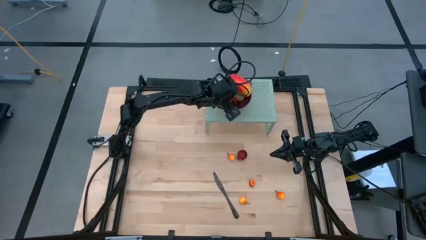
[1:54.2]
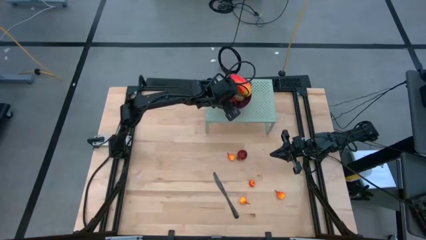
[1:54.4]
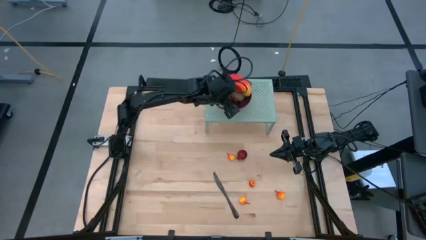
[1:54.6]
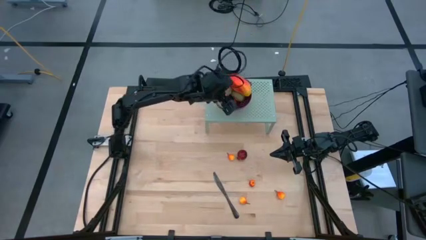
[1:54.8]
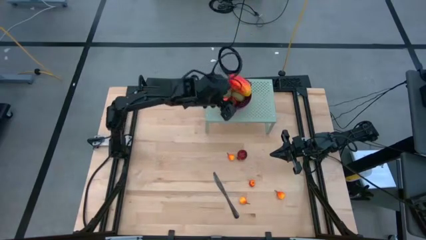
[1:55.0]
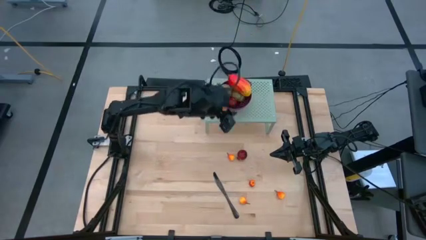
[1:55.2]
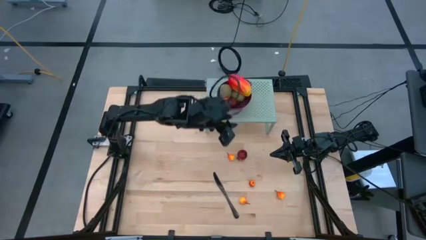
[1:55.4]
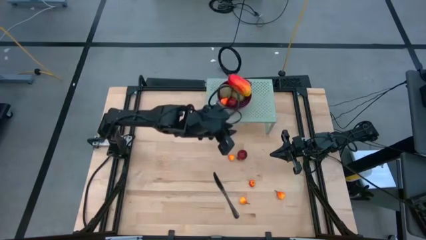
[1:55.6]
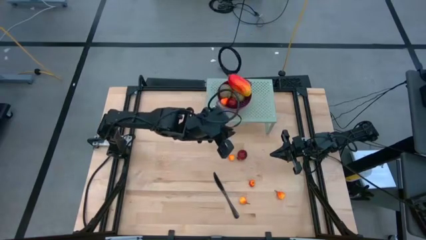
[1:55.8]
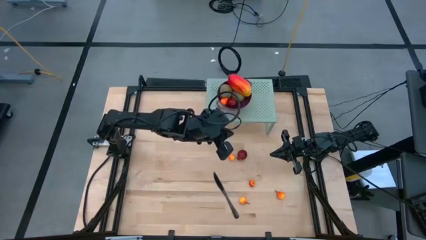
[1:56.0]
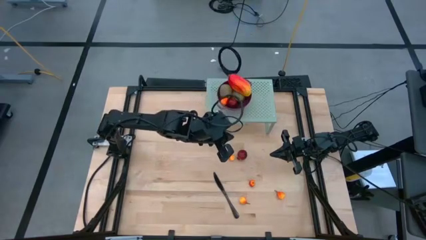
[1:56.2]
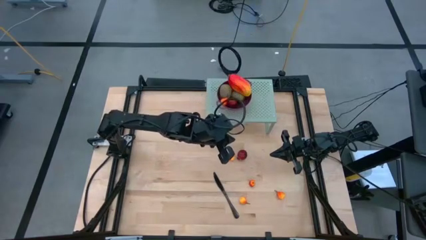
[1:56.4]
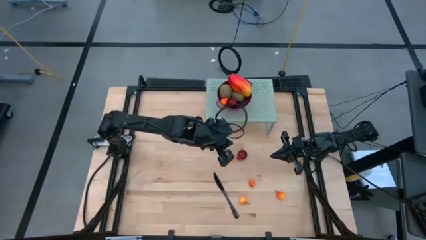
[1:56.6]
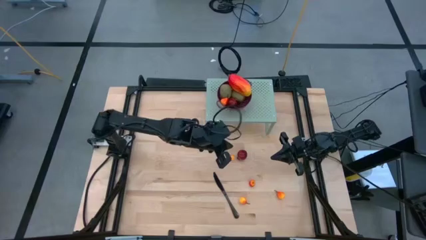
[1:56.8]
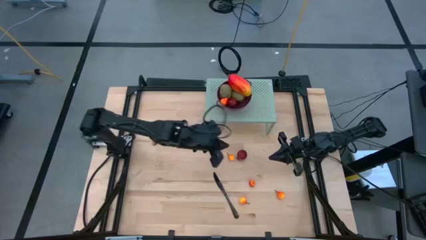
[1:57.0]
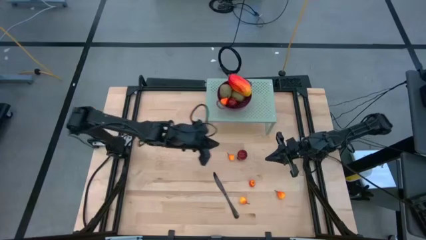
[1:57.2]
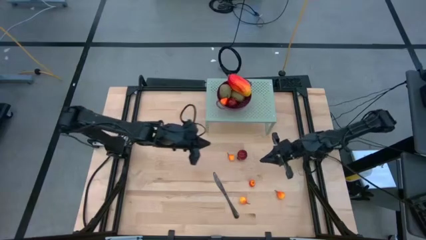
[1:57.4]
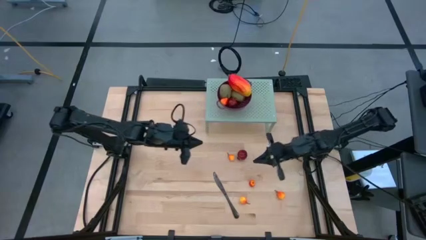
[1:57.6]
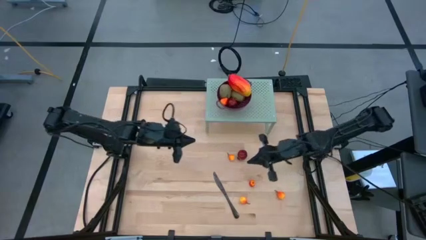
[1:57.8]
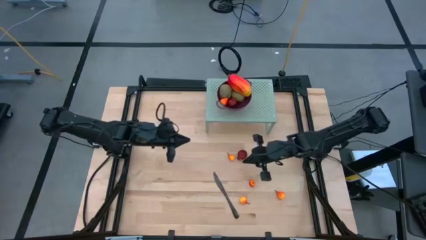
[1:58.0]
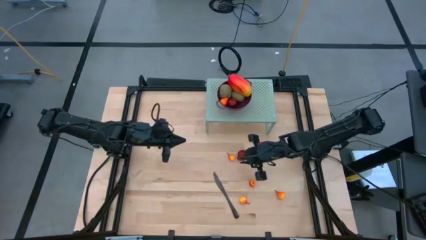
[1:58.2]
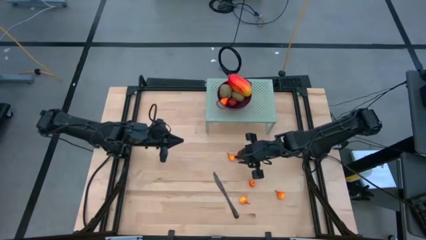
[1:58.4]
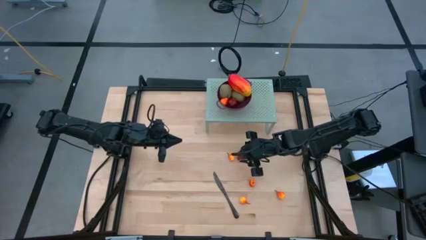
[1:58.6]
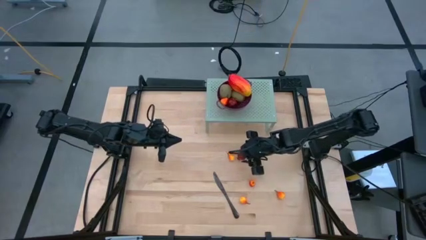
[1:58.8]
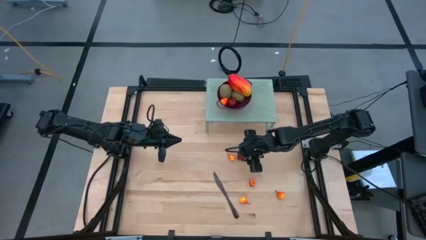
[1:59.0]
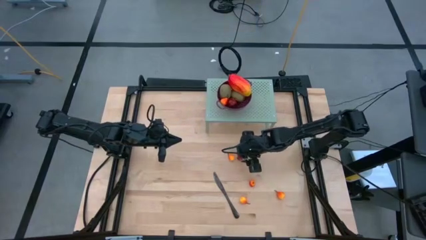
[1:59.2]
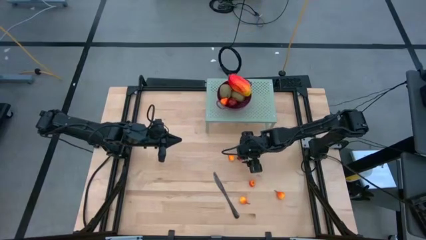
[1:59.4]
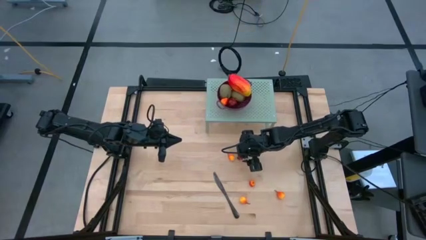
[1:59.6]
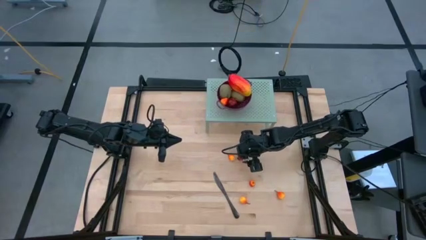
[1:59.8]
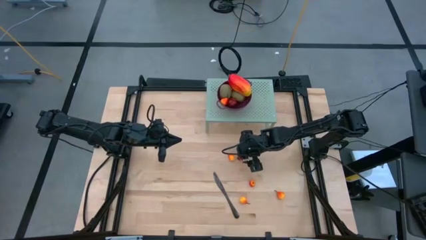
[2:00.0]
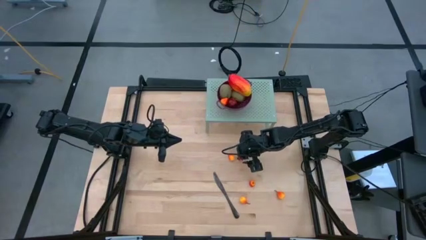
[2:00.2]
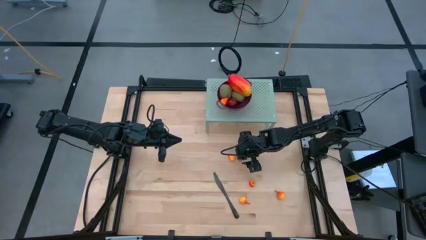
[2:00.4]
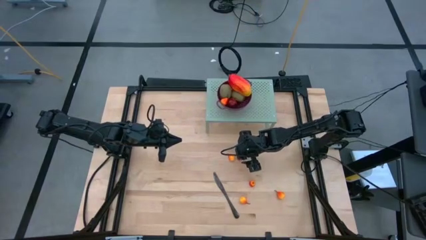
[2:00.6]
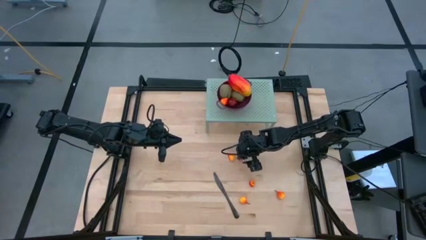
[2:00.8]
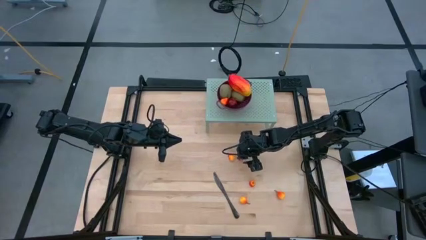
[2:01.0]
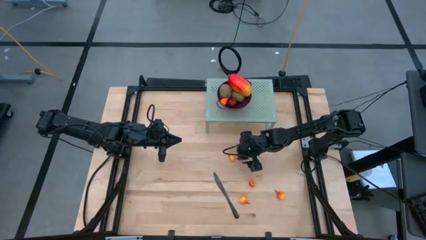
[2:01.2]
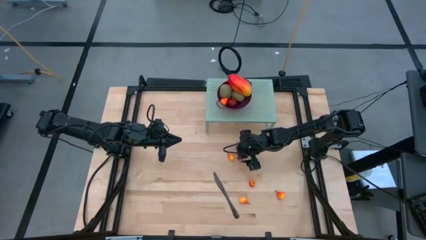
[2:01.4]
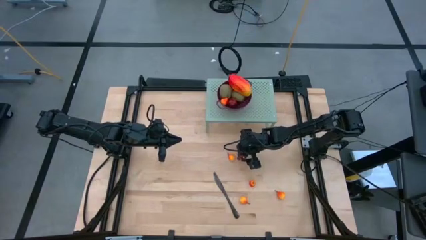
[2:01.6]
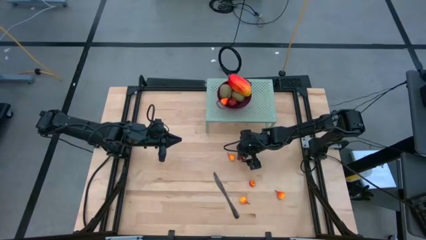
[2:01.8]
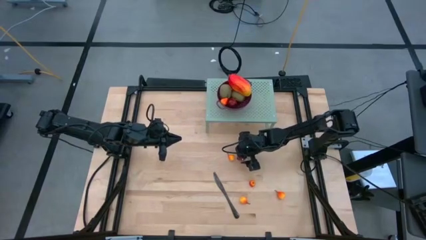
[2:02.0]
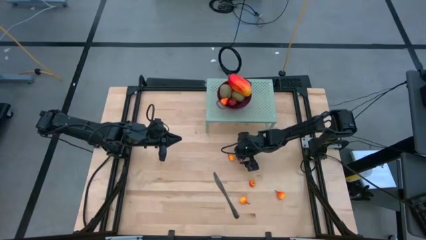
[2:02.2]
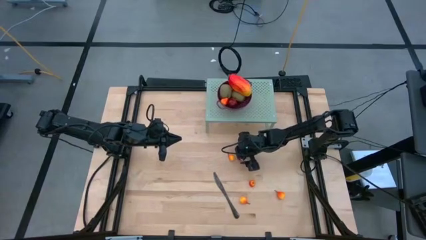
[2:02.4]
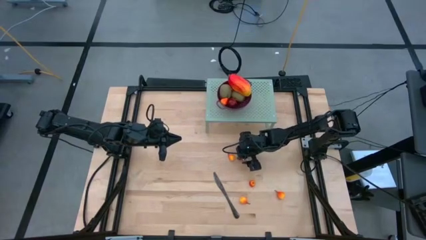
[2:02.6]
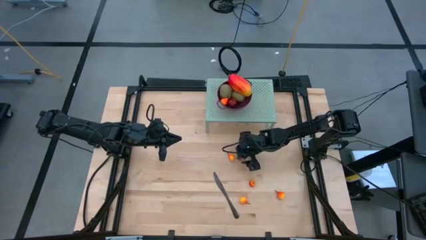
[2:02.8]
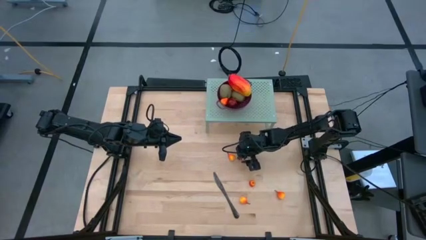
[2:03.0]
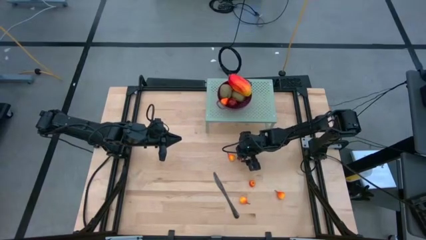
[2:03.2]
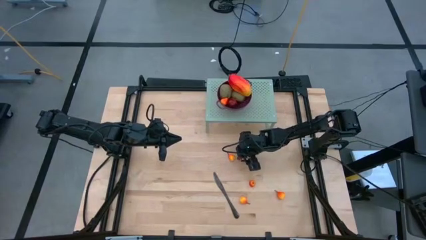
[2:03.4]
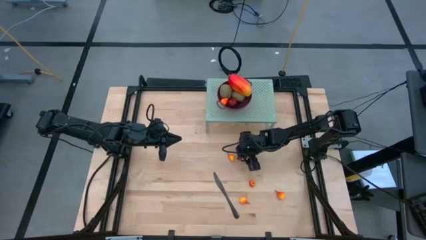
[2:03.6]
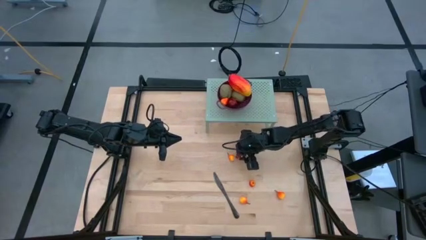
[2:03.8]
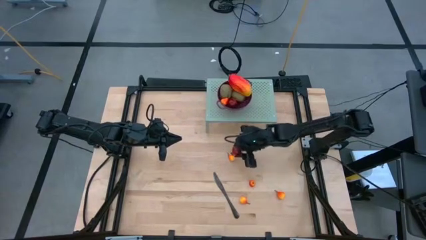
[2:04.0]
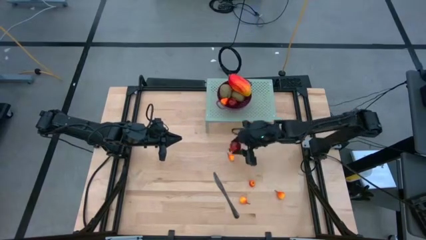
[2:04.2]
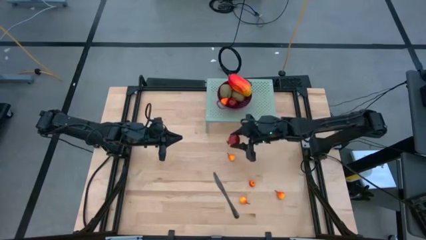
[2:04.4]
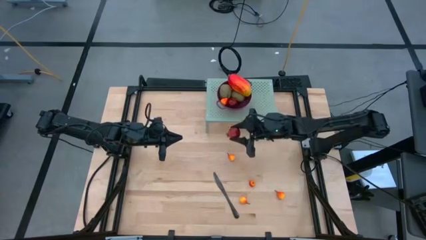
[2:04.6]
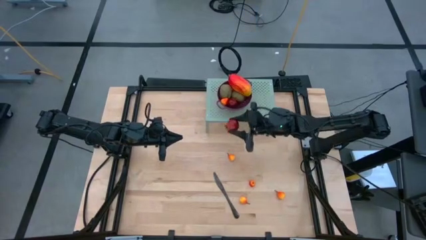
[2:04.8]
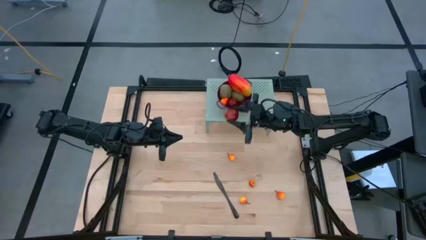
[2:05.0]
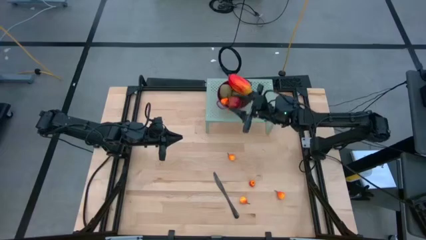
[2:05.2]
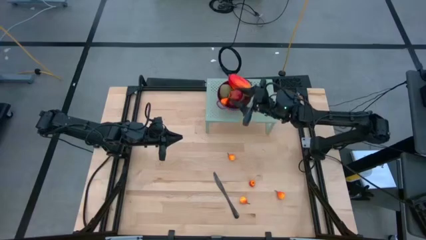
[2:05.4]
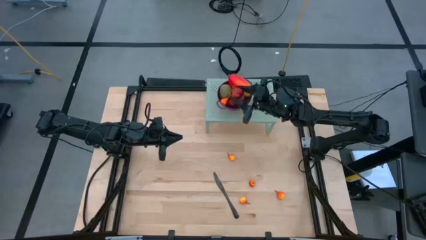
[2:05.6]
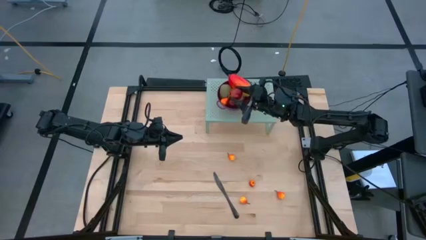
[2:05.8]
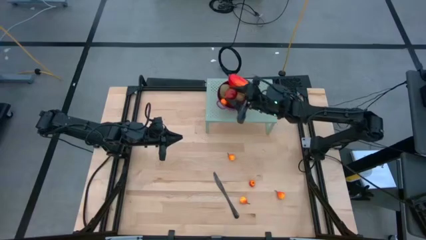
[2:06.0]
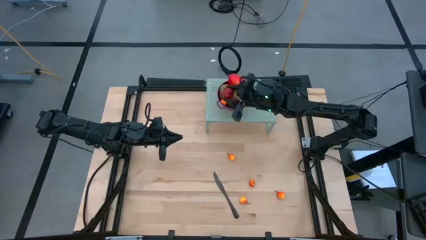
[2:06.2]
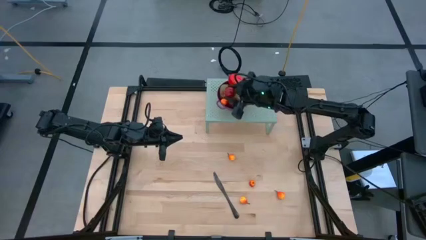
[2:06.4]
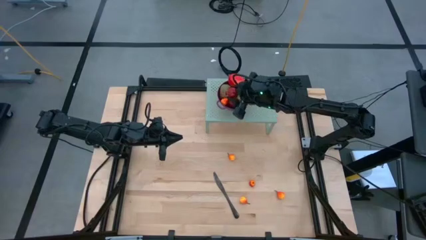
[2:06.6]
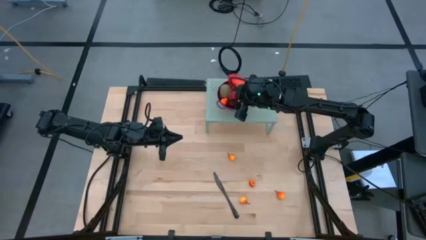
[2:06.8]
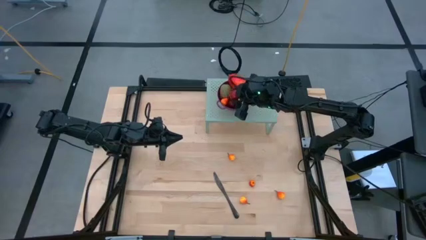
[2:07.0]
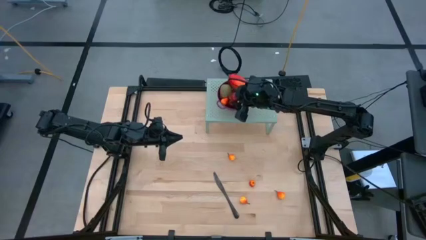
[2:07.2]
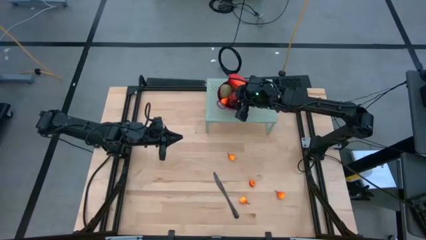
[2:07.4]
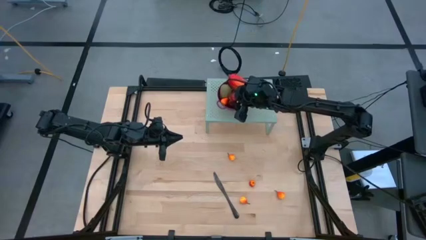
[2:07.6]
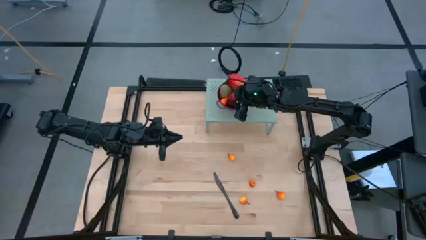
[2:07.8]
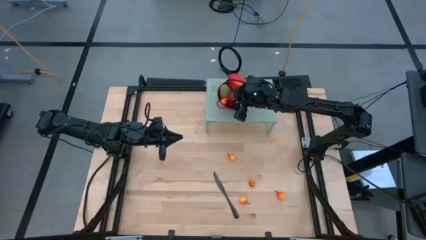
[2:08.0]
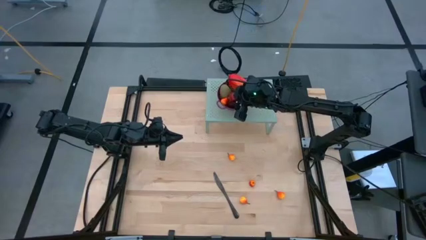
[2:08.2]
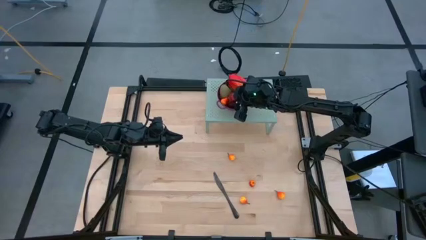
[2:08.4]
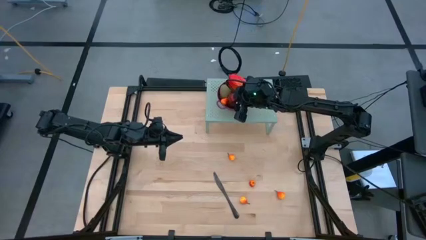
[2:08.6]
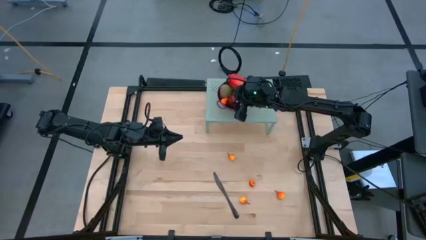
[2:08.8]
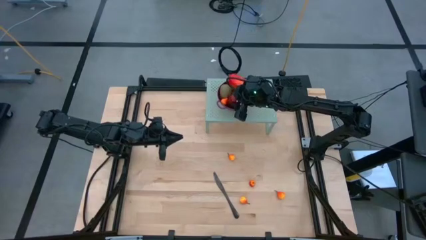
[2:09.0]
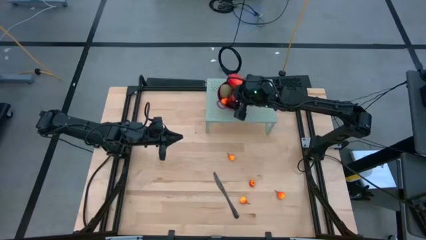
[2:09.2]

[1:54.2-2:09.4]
Task: Pick & Place Fruit
Put the red pomegranate into the violet strainer bowl on the shelf

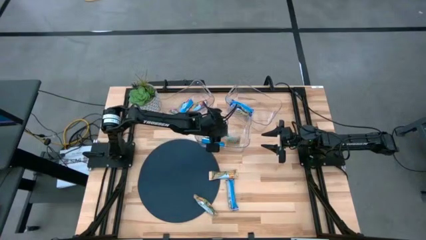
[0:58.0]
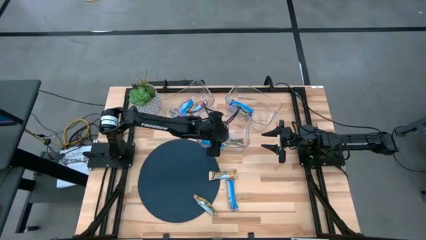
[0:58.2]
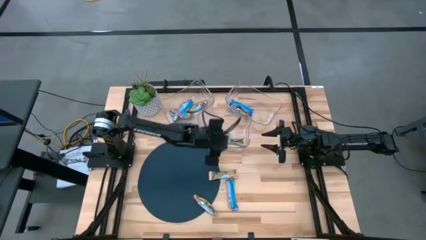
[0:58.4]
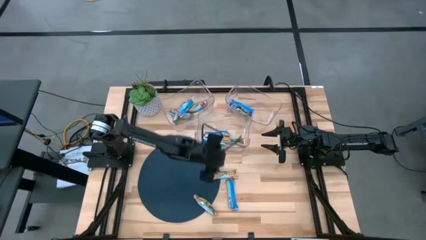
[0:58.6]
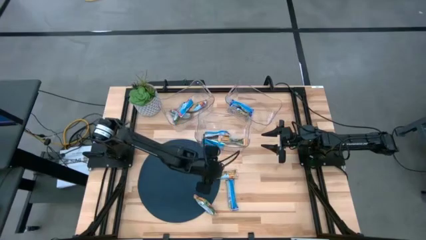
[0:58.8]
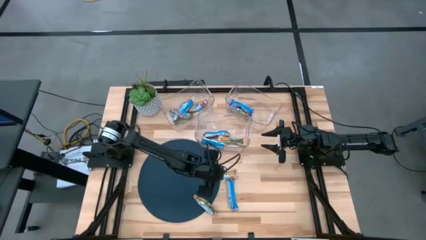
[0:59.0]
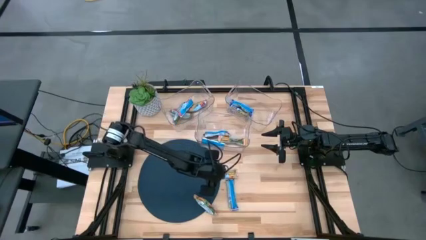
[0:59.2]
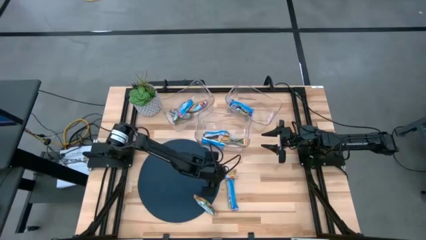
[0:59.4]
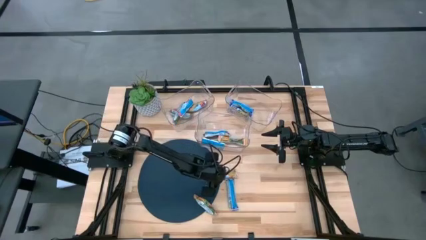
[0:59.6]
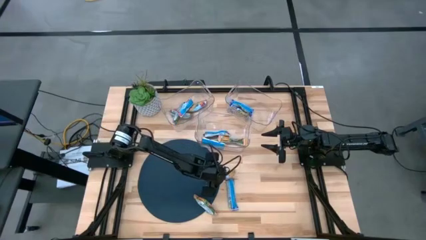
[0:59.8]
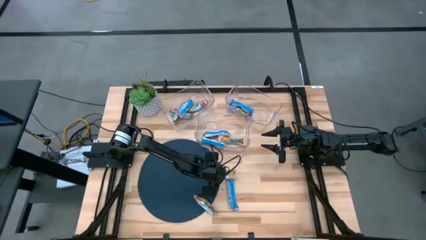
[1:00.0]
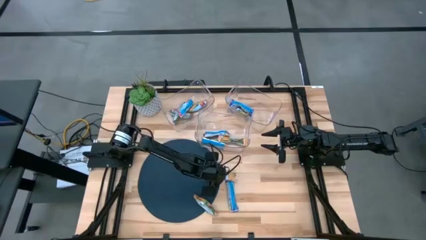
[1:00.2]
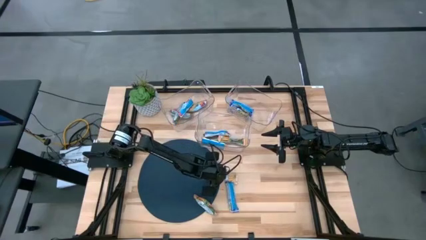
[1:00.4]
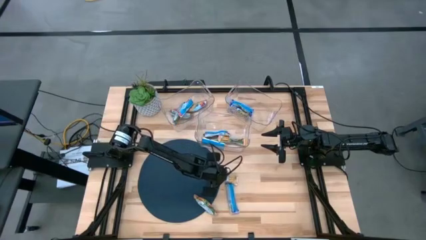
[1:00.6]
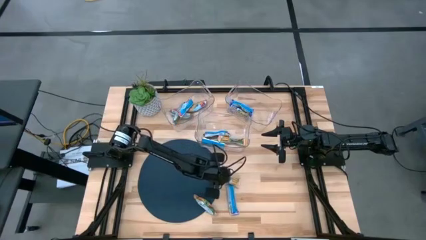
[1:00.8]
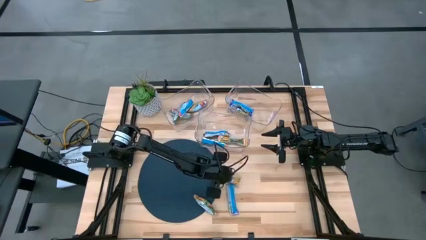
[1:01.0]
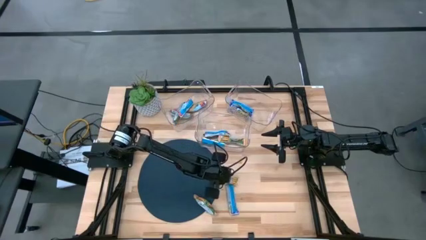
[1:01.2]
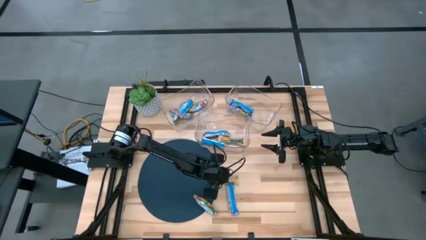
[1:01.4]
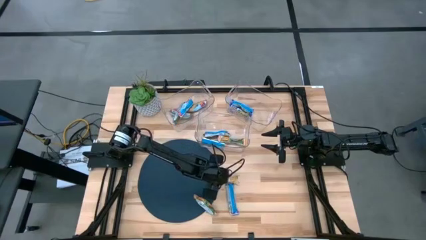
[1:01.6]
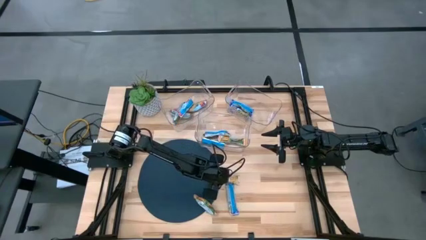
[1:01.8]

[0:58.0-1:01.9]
Task: Pick and place Granola Bars by type
Put the yellow granola bar into the middle transparent bin
